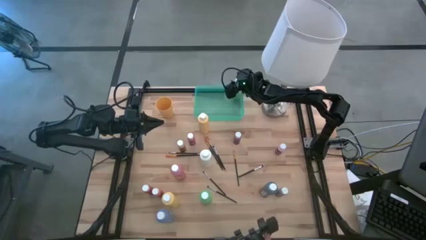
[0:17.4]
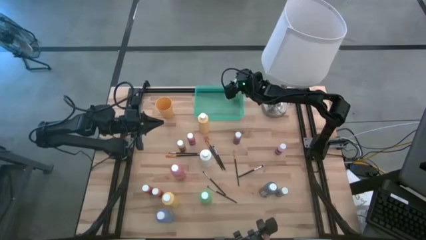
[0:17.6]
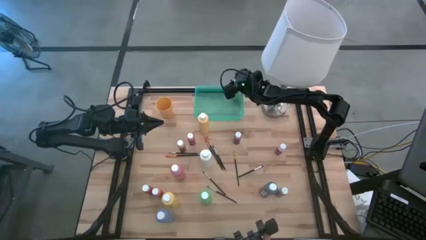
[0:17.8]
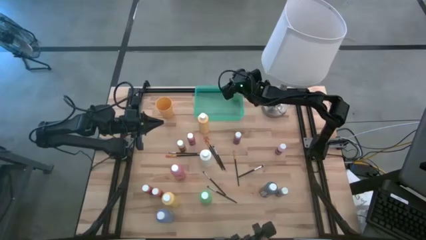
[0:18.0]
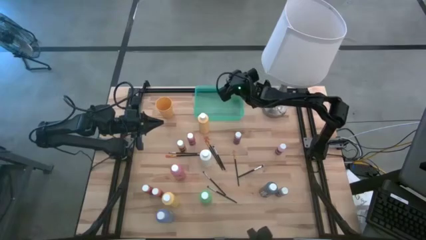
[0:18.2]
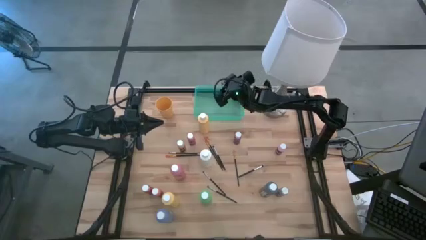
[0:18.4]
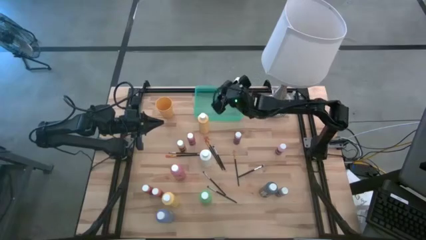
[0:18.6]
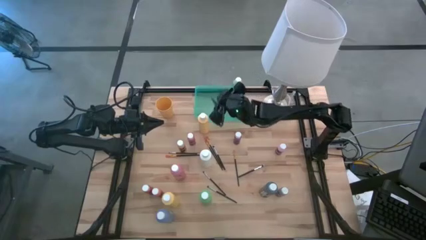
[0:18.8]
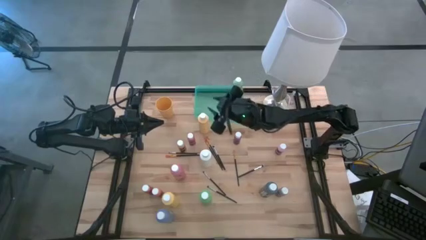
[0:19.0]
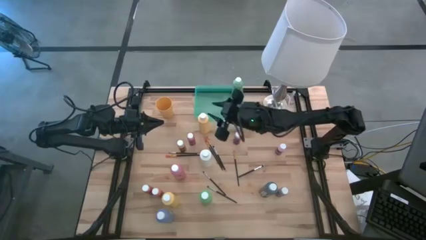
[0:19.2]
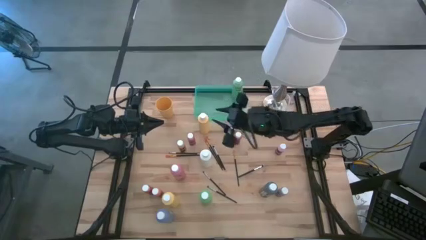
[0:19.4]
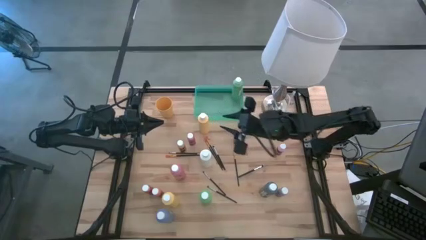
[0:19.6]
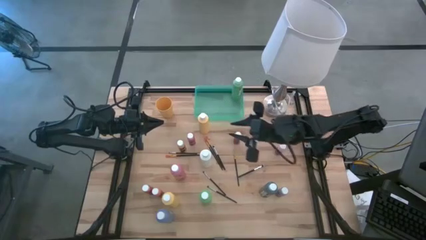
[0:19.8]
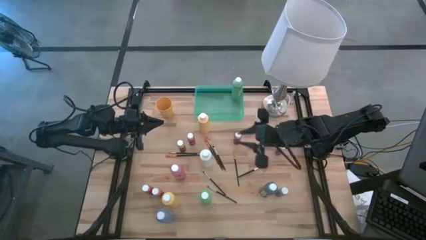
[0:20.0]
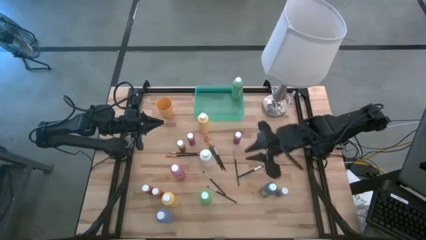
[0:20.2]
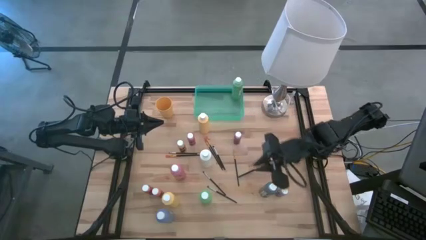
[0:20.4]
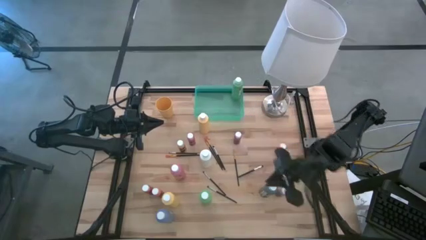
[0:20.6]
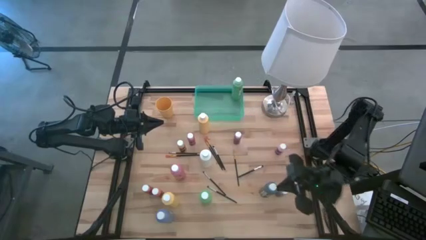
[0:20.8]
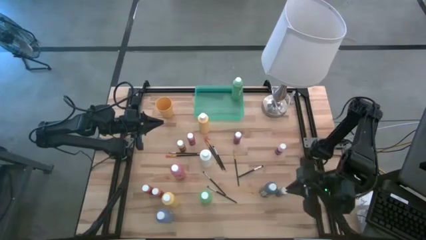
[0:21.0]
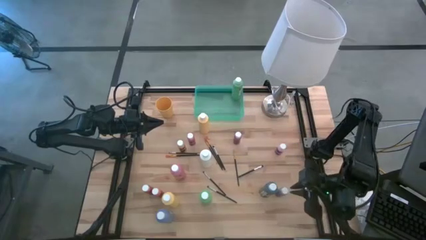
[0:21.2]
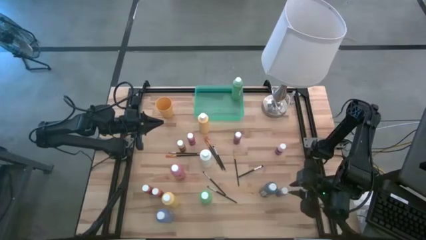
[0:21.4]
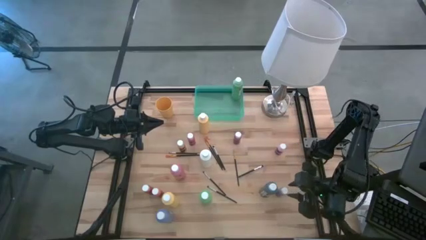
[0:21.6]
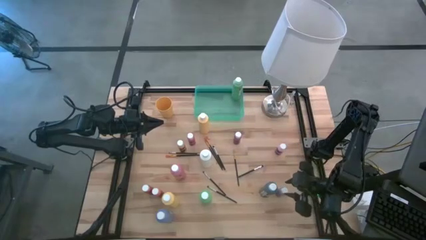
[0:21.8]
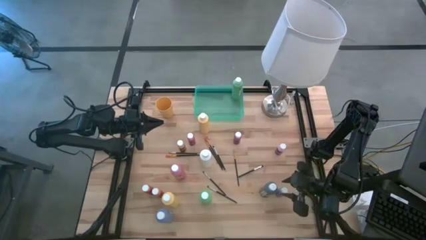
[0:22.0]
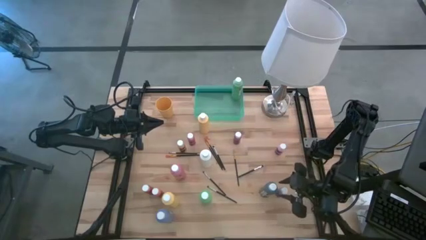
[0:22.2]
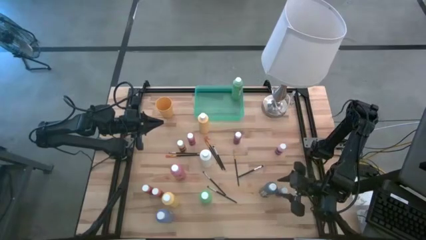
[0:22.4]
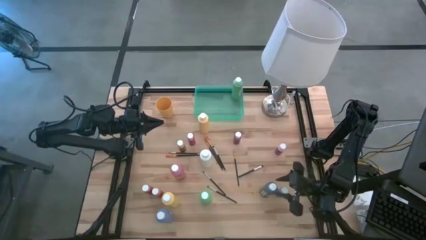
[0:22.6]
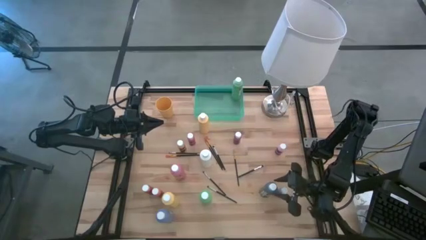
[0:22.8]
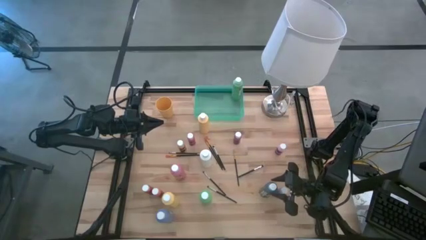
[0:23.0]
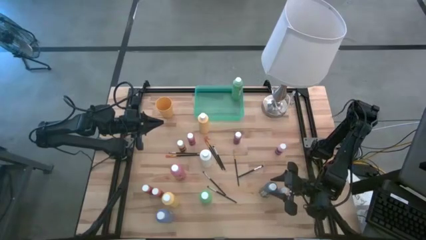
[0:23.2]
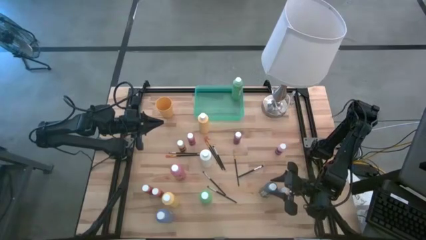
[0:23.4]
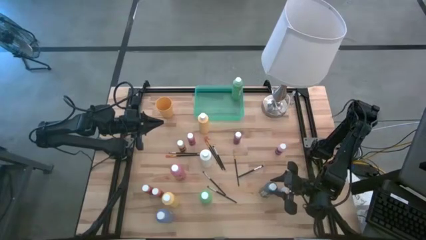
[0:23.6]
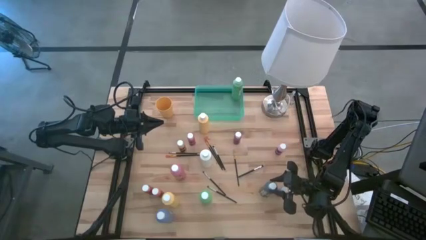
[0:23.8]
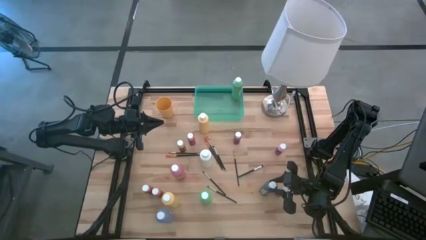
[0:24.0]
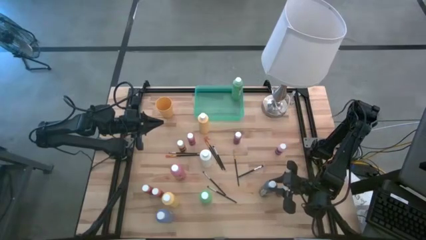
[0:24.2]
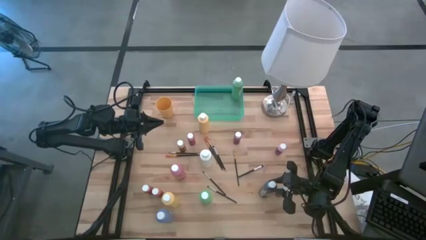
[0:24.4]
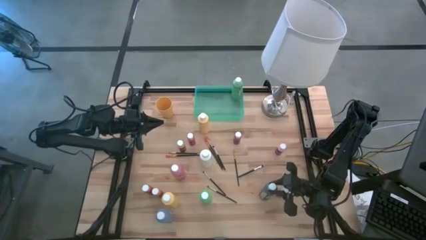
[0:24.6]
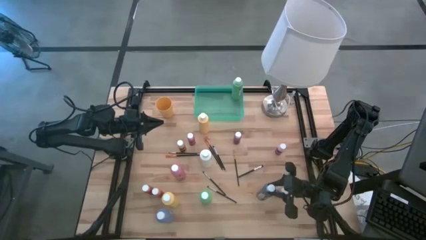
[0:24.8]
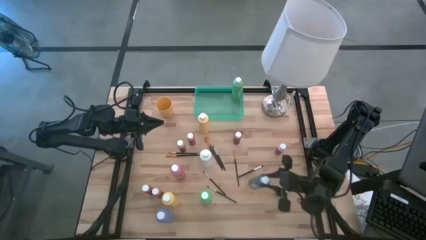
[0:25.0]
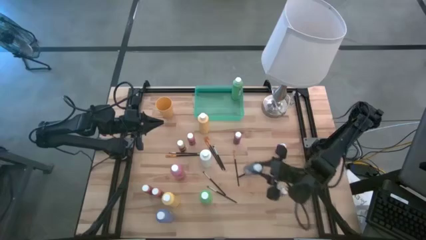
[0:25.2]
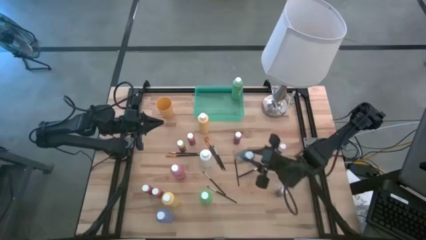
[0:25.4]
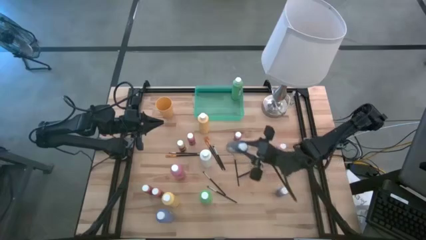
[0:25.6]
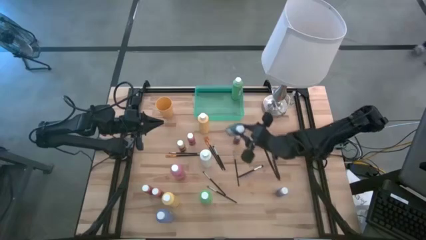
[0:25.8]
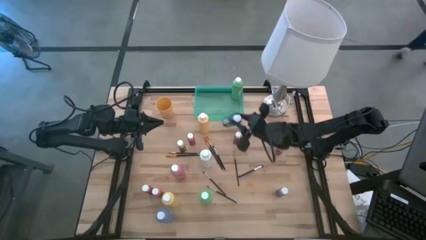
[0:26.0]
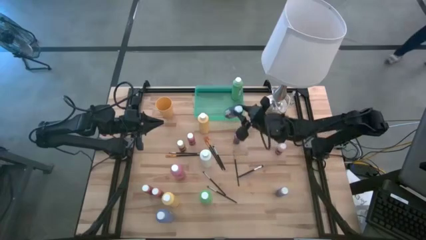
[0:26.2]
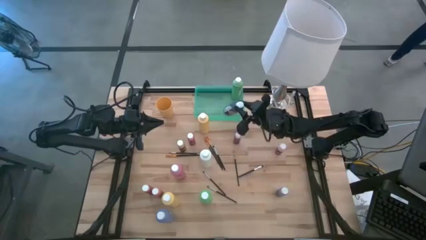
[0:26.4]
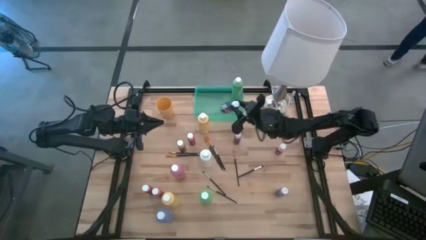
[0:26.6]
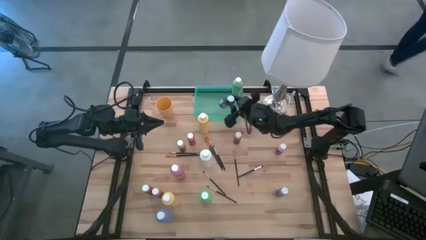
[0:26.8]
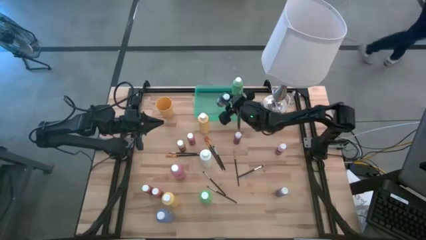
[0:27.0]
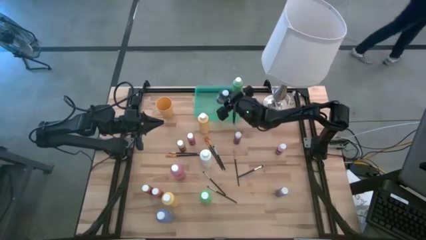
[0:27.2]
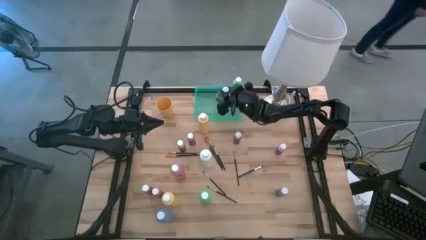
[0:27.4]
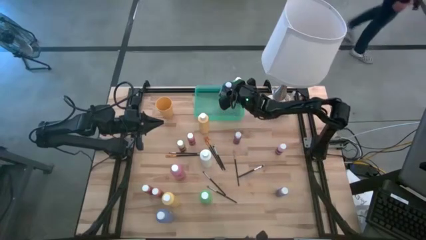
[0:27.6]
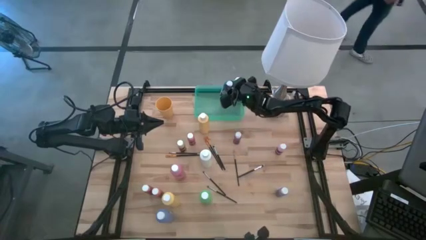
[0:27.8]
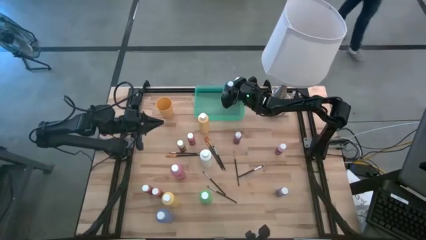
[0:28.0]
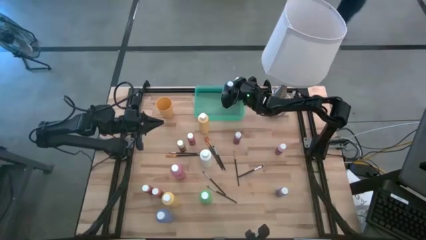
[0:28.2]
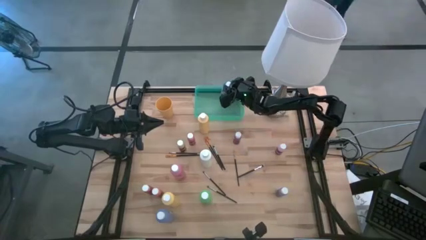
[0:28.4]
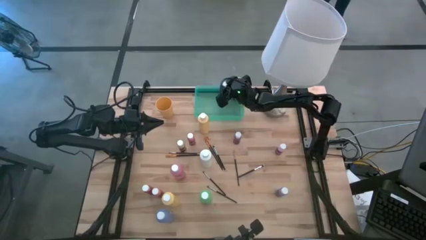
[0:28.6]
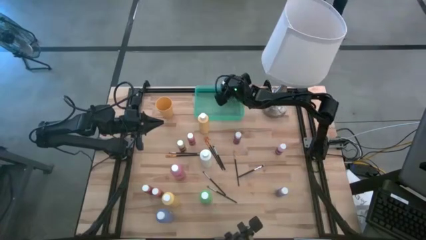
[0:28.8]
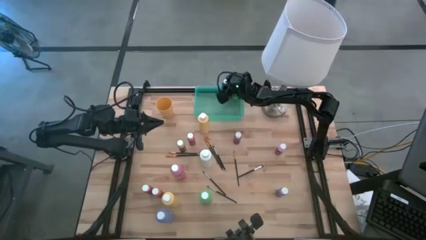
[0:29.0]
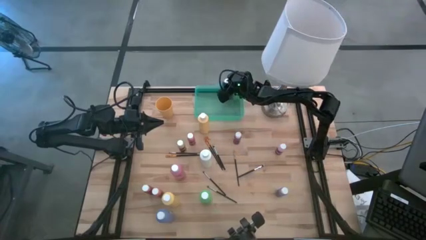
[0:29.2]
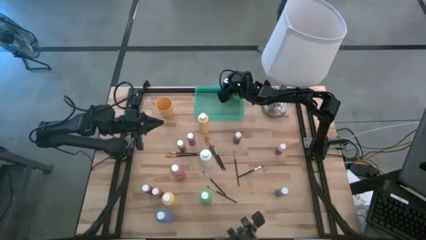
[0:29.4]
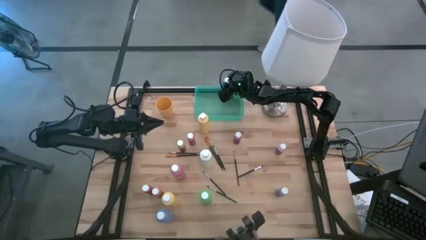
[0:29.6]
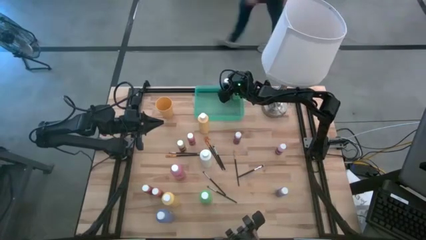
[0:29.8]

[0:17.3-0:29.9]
Task: Pick & Place Paint Supplies
Put the large black paint bottle into the green bin
